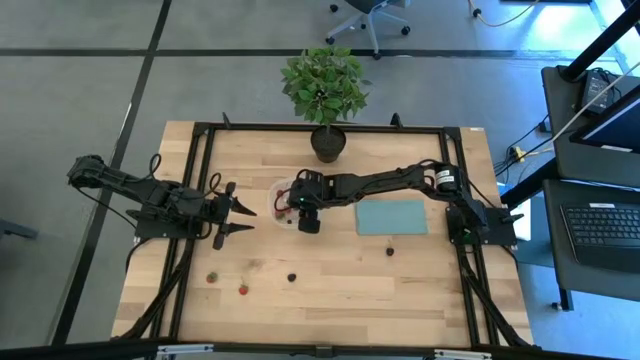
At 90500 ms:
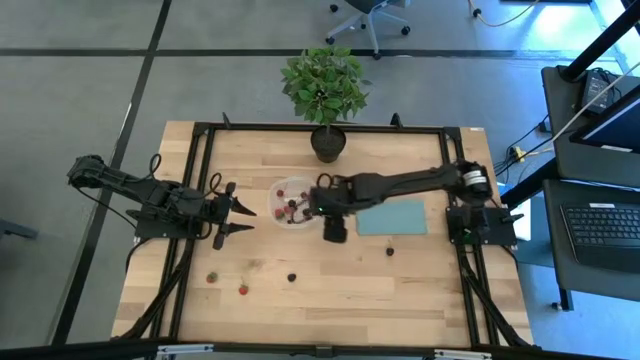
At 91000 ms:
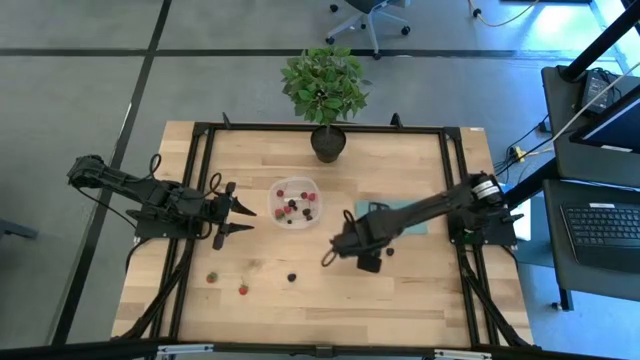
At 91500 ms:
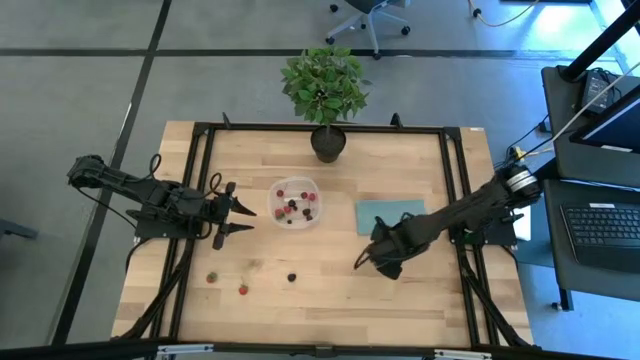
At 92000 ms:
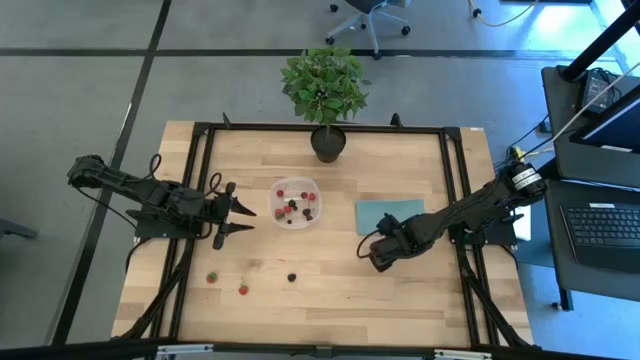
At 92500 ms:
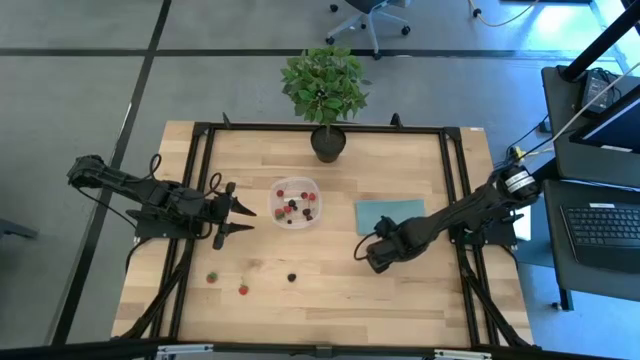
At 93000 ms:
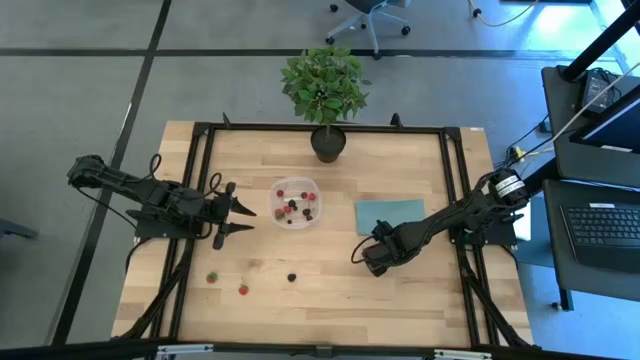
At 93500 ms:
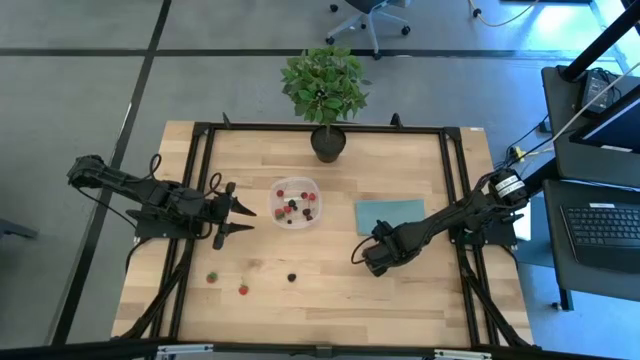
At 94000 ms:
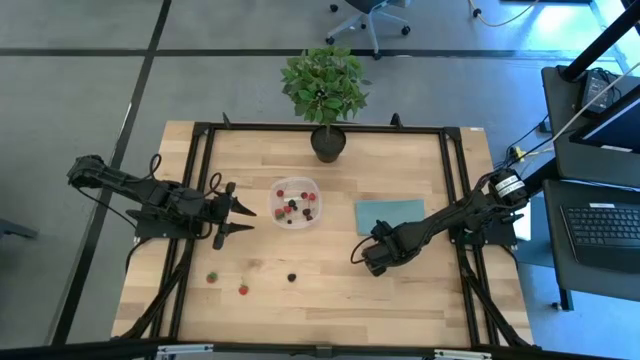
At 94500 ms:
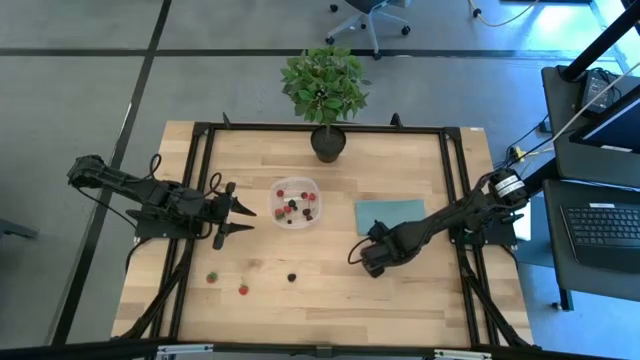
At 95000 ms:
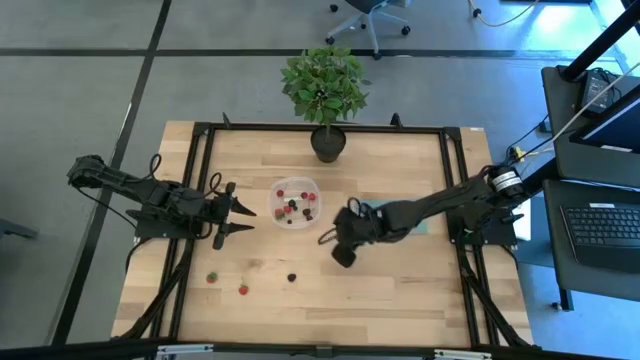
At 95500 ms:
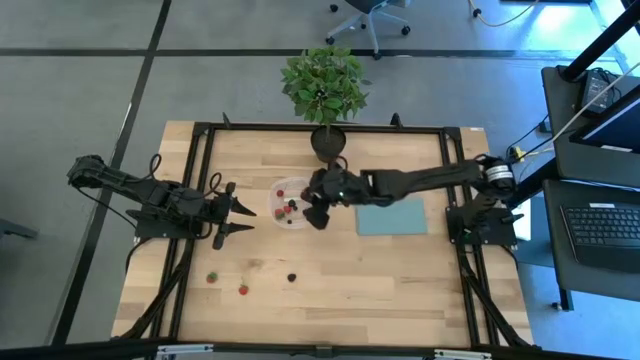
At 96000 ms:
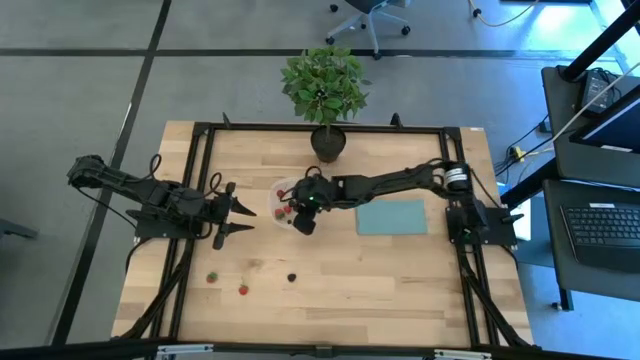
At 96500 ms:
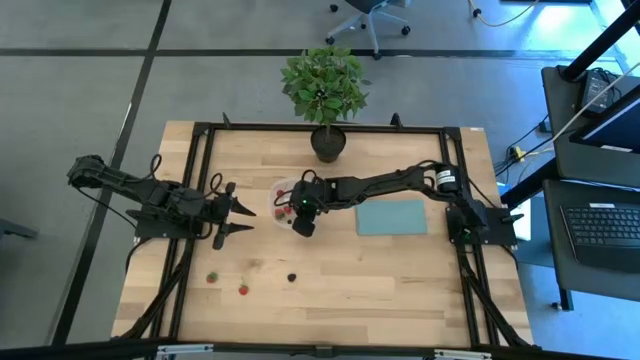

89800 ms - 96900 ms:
Task: Pick and placing Produce into tupperware
Put the black cherry into the container

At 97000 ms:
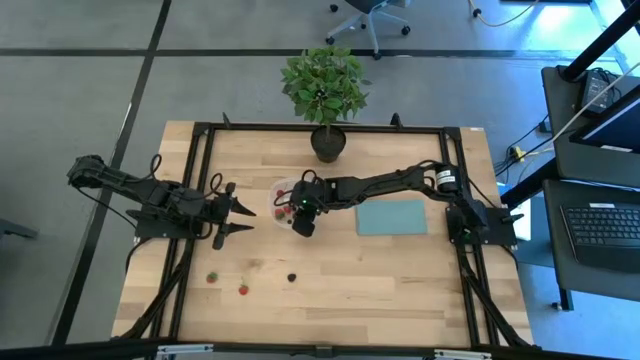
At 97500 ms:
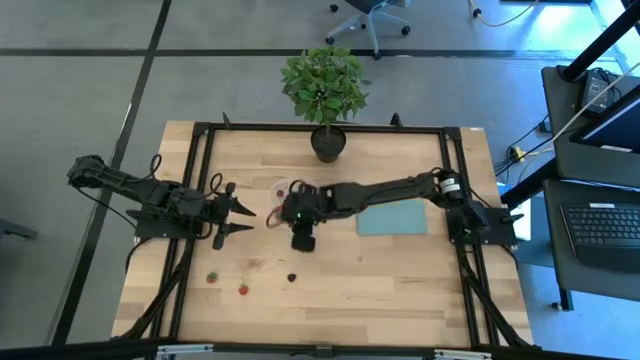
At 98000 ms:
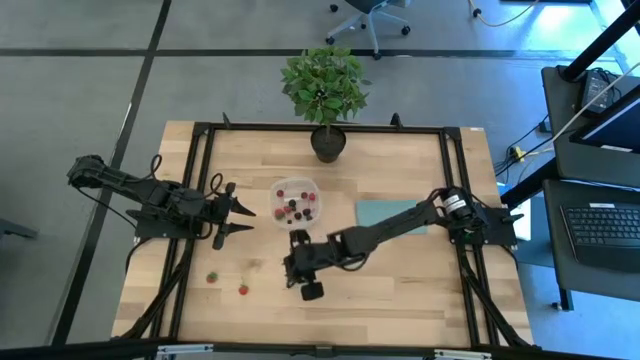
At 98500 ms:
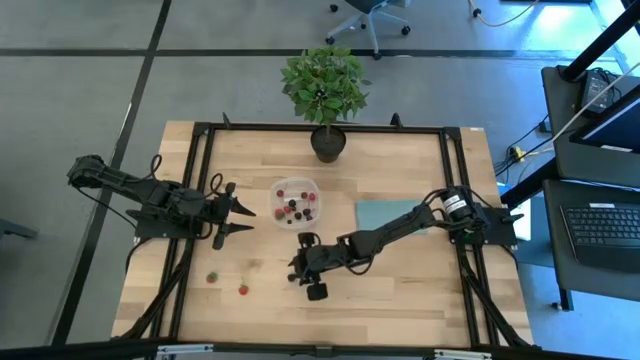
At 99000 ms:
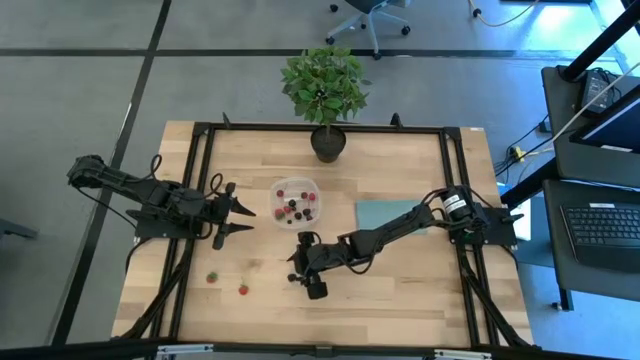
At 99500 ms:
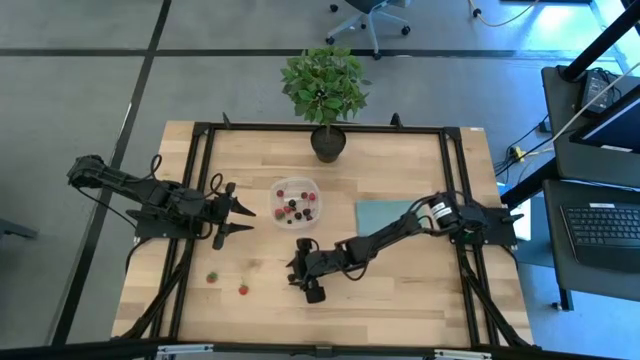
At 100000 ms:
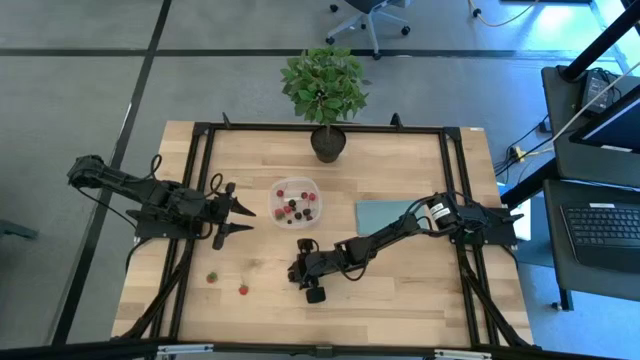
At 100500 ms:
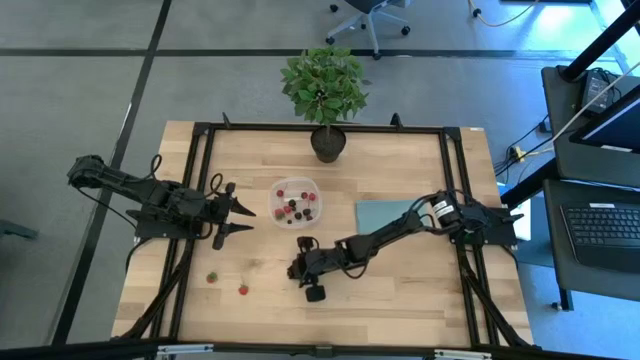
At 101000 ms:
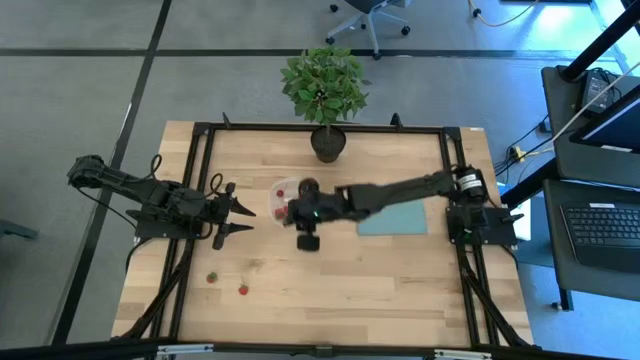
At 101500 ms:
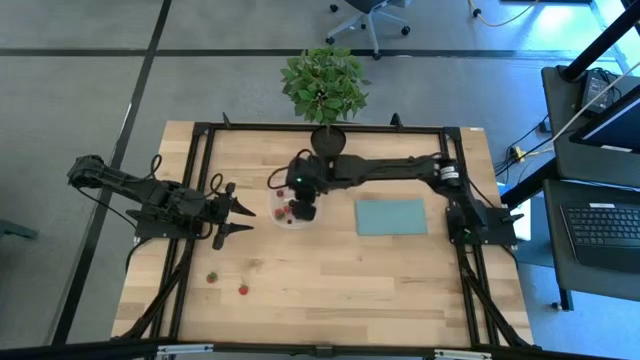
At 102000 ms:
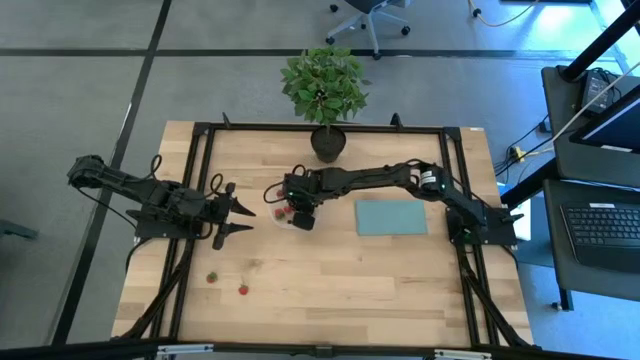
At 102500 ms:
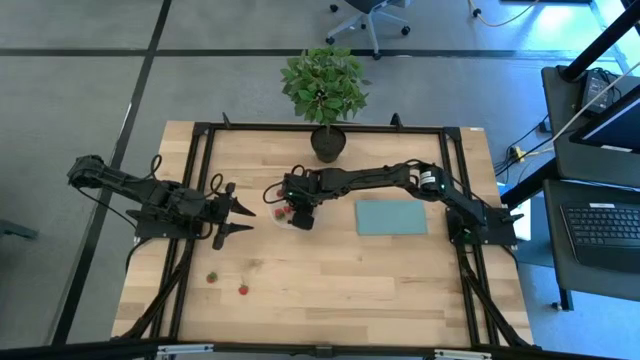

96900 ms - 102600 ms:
Put the blackberry into the container

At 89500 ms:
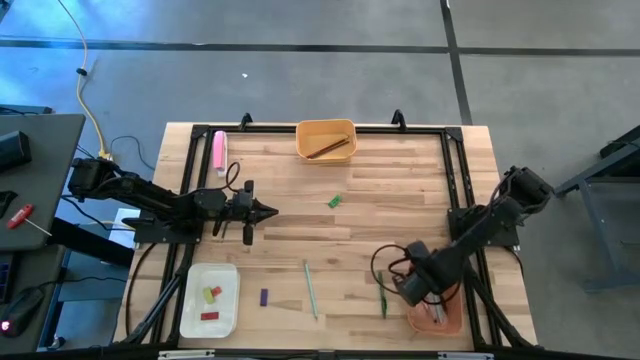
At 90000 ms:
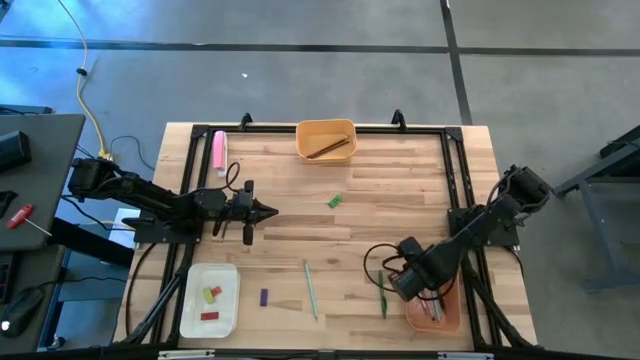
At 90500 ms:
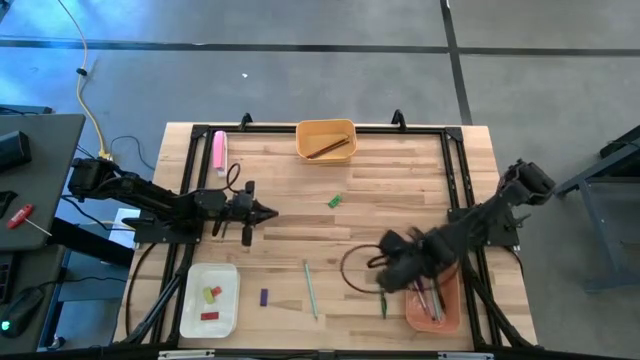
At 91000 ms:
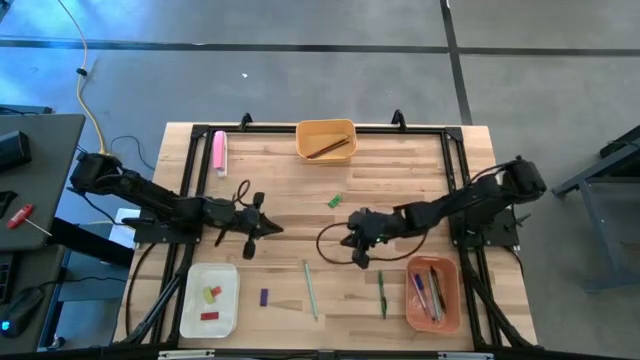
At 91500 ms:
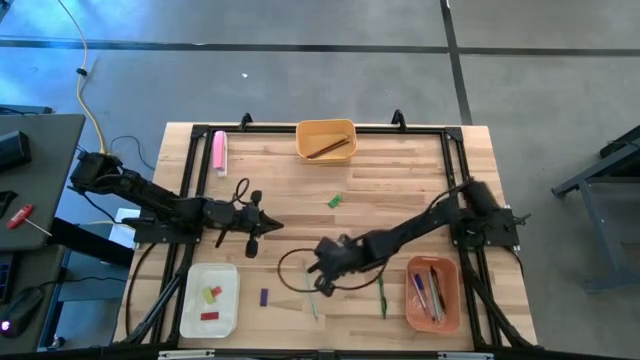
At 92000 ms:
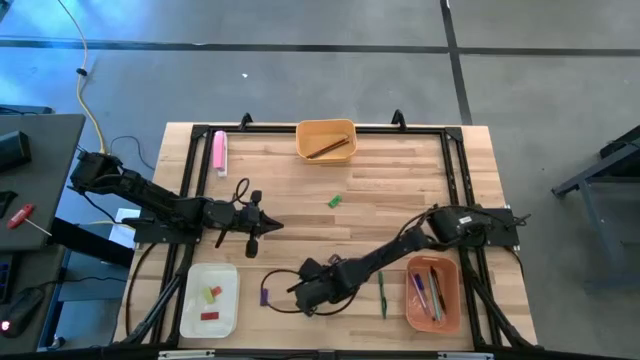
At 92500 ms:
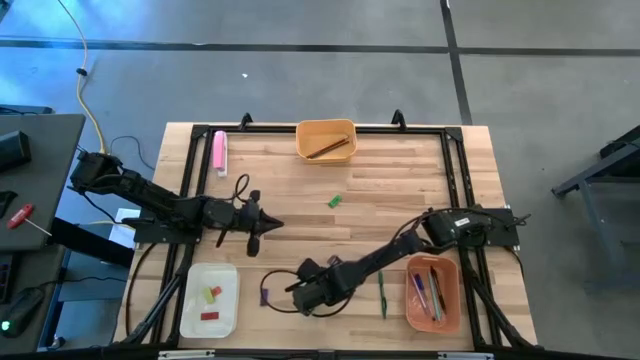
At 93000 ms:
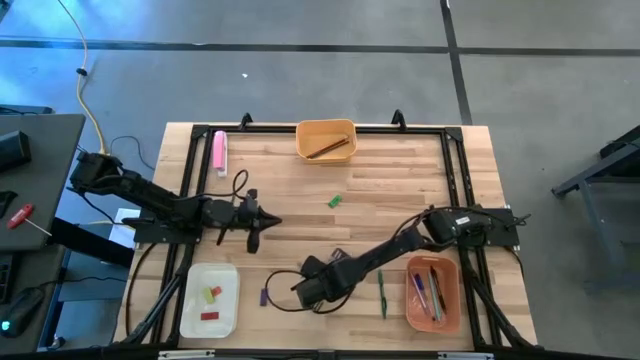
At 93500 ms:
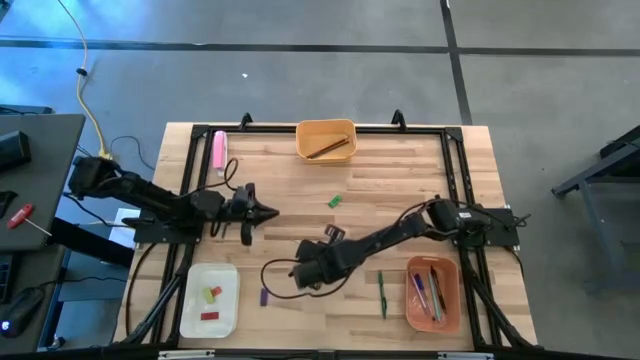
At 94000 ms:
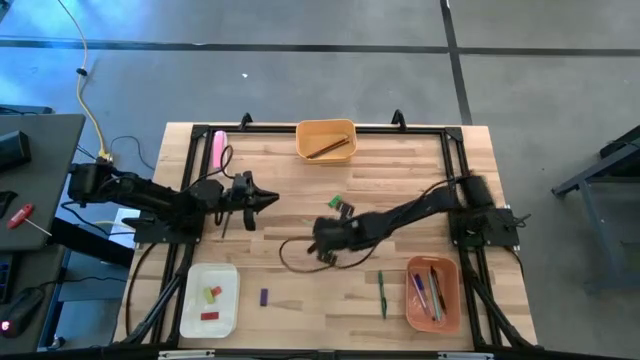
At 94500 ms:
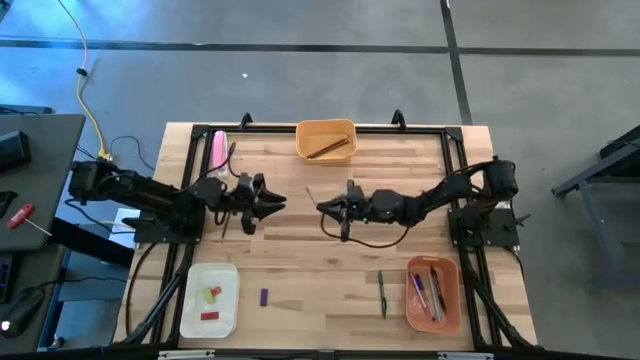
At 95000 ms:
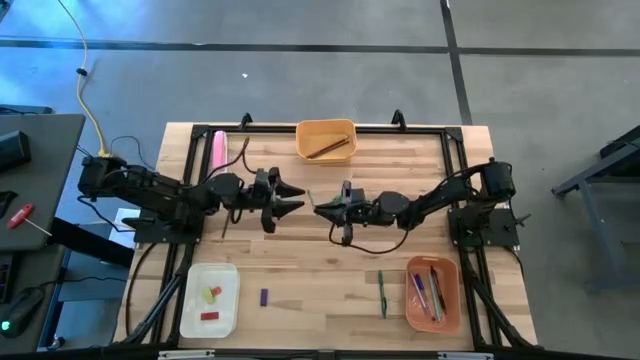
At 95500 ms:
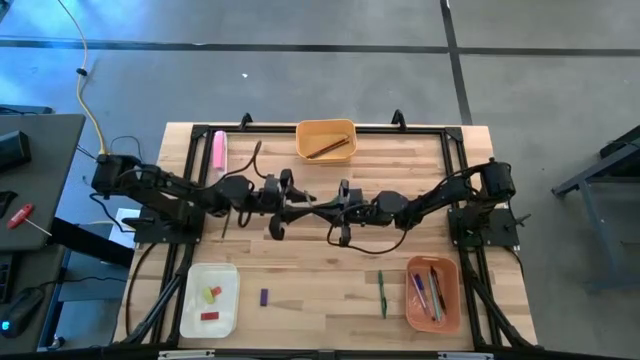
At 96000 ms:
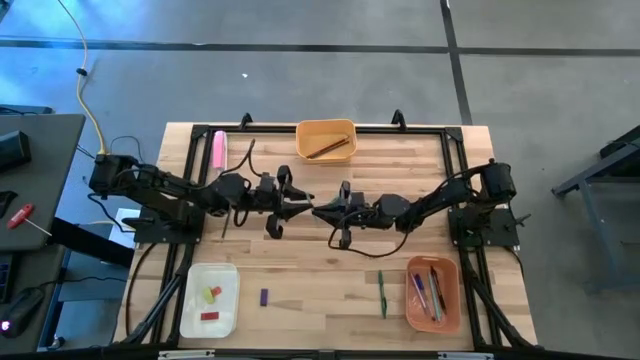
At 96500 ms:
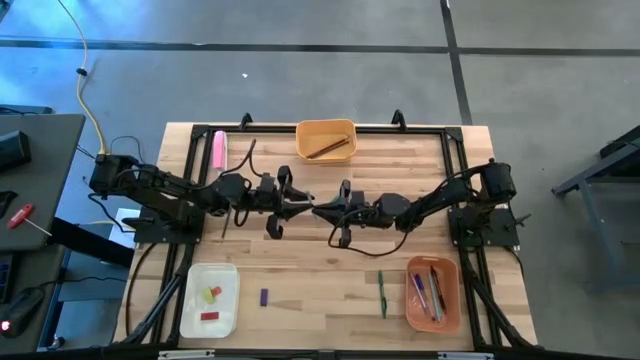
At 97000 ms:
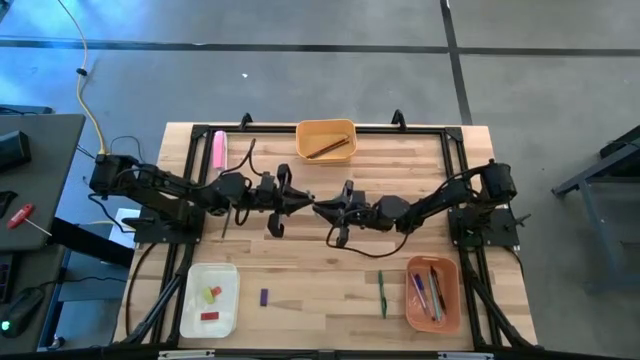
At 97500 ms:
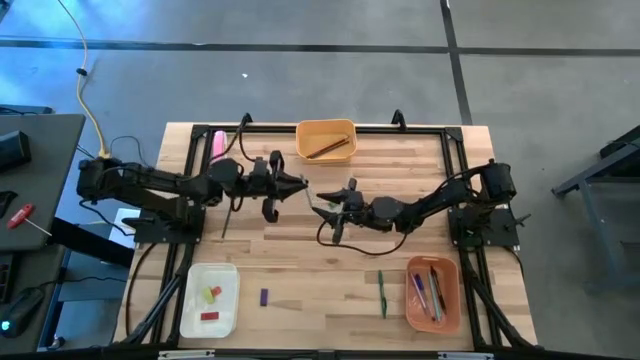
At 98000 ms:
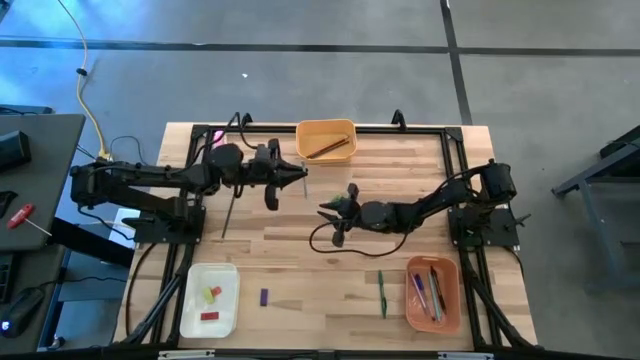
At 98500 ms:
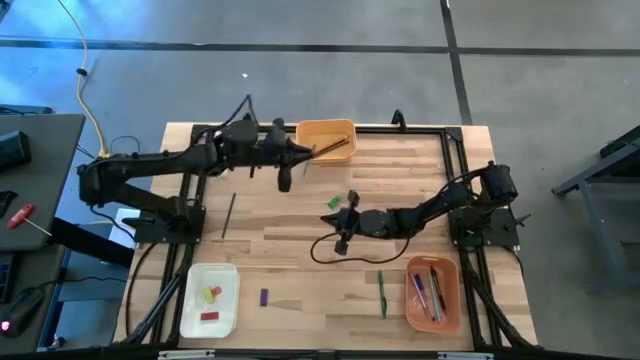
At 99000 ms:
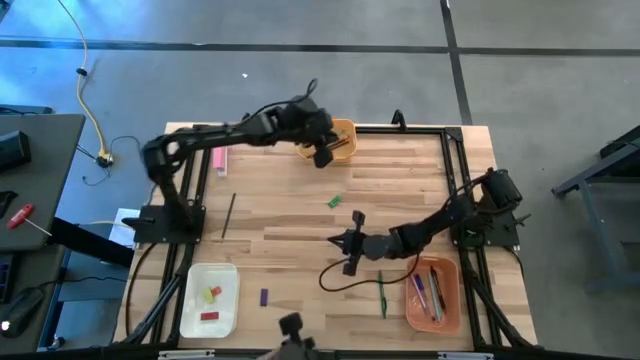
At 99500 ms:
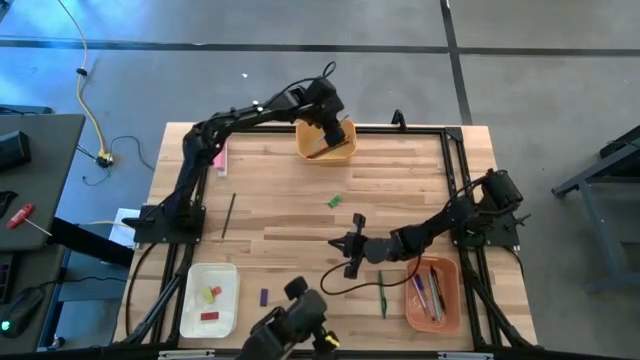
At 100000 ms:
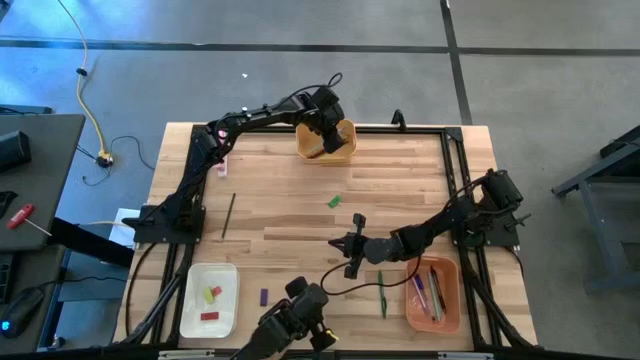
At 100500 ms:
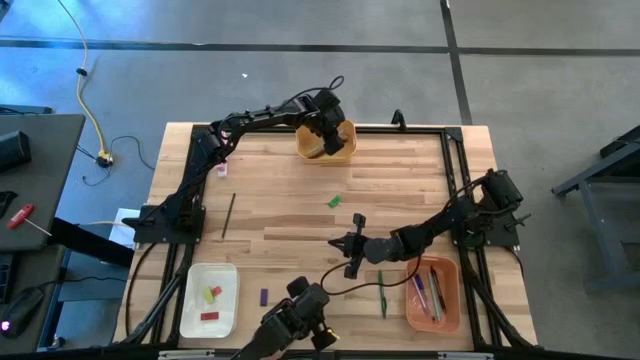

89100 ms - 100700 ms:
Task: Sort crayons/erasers/pens/pencils in bins
Put the light blue pencil into the yellow bin
